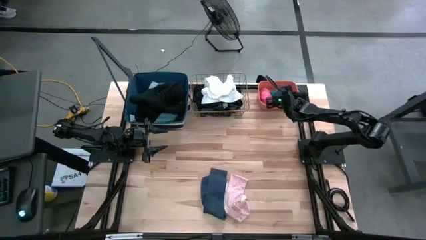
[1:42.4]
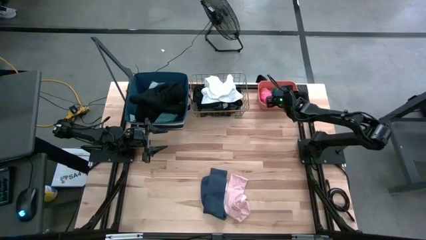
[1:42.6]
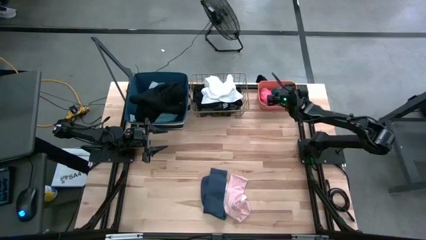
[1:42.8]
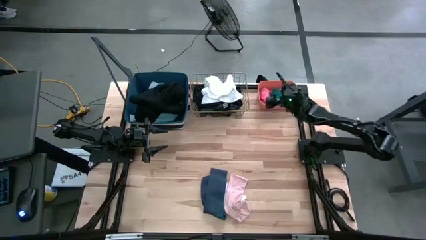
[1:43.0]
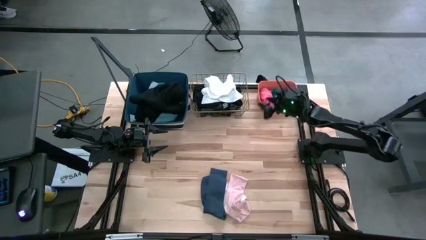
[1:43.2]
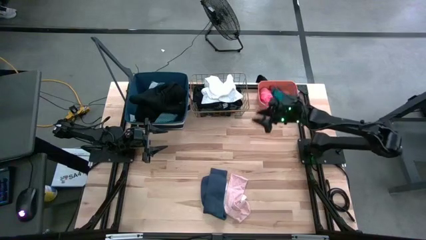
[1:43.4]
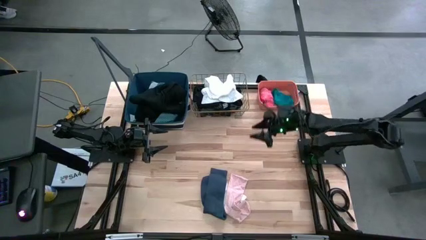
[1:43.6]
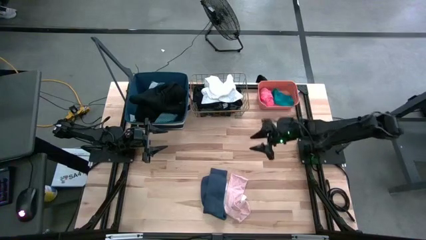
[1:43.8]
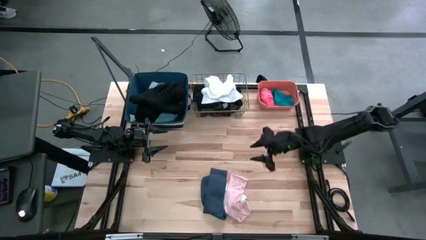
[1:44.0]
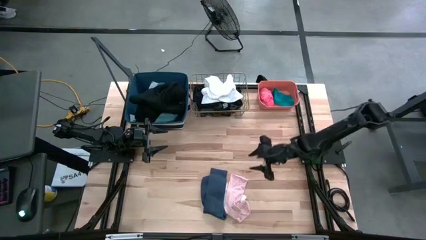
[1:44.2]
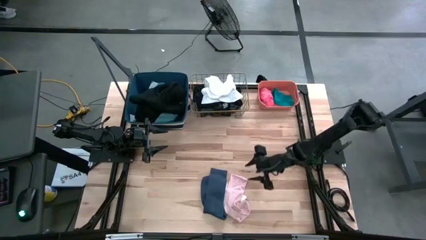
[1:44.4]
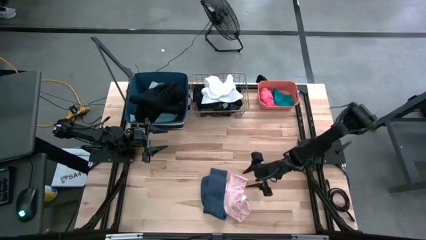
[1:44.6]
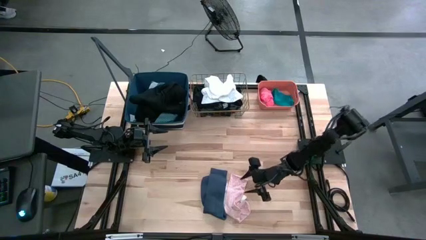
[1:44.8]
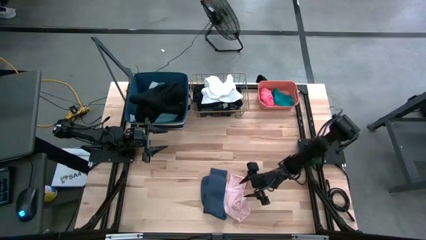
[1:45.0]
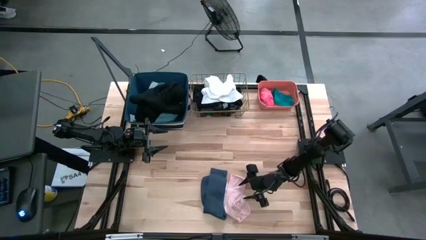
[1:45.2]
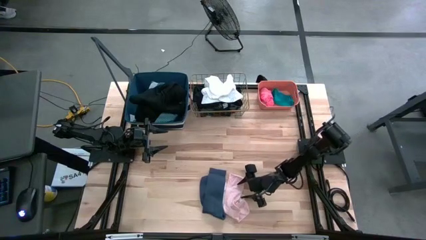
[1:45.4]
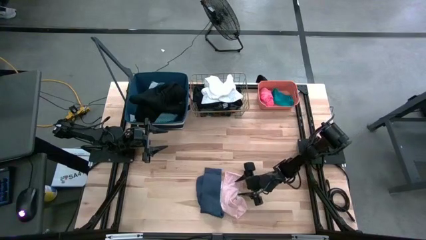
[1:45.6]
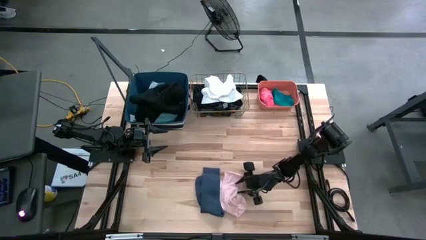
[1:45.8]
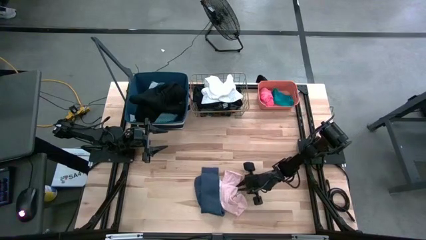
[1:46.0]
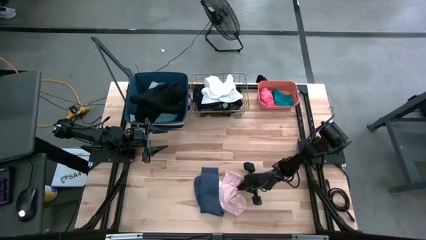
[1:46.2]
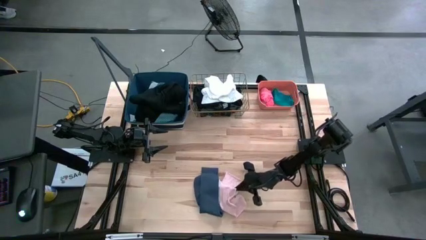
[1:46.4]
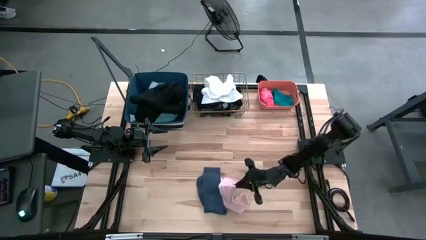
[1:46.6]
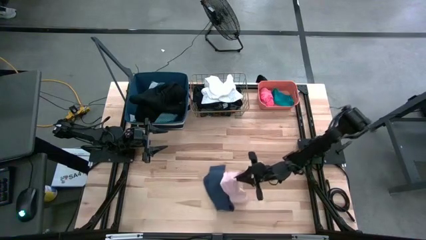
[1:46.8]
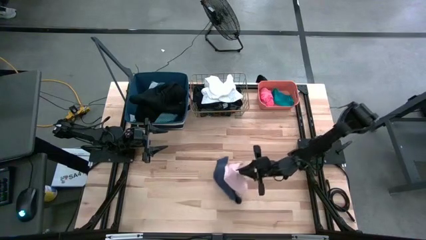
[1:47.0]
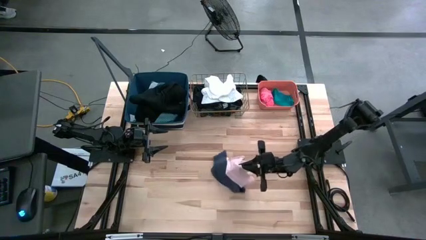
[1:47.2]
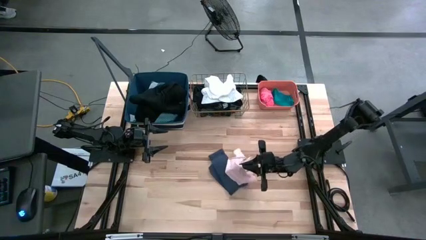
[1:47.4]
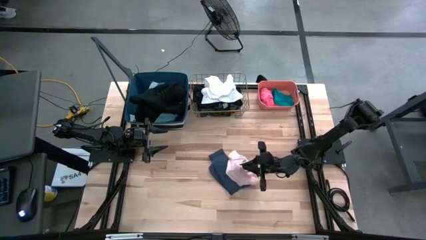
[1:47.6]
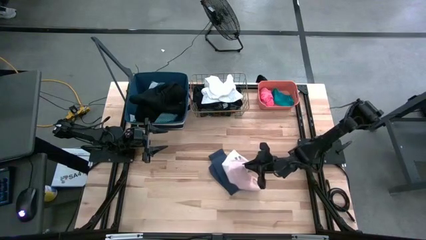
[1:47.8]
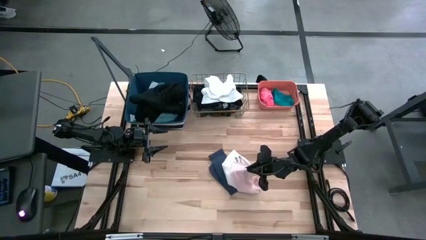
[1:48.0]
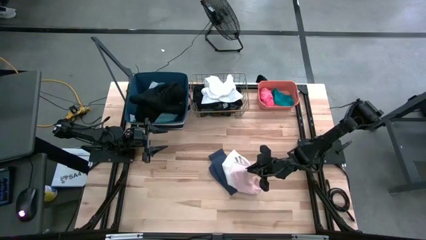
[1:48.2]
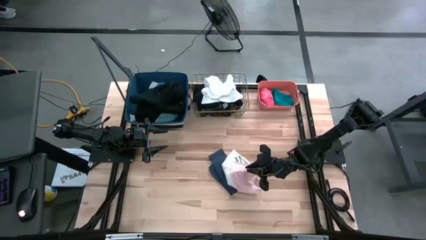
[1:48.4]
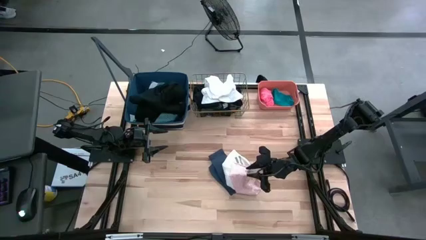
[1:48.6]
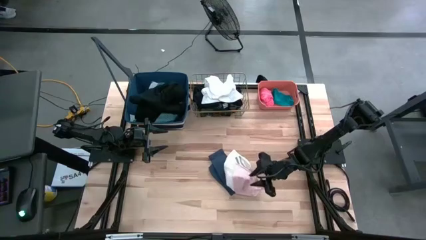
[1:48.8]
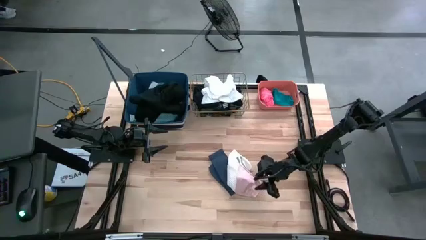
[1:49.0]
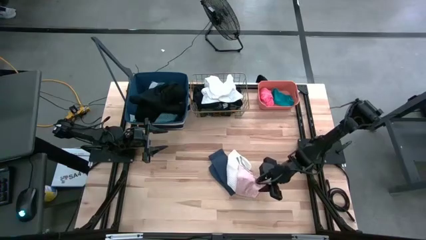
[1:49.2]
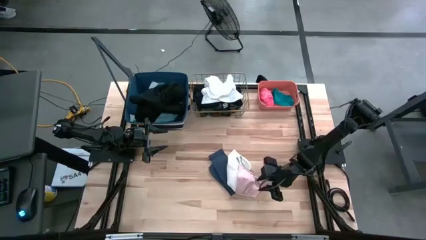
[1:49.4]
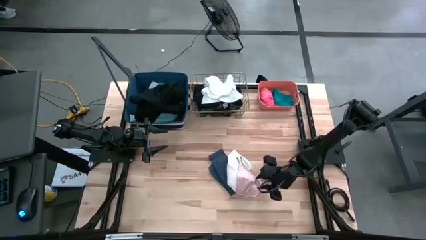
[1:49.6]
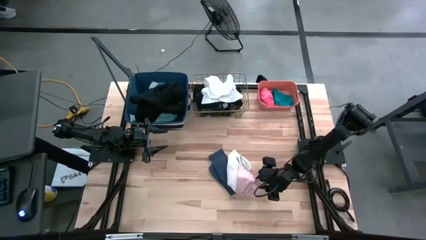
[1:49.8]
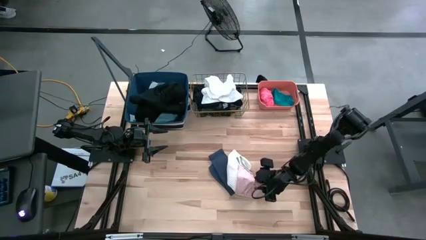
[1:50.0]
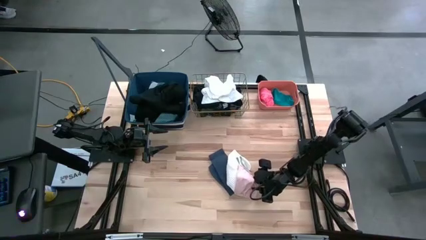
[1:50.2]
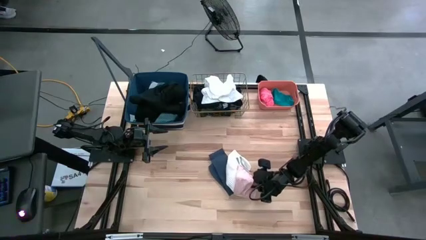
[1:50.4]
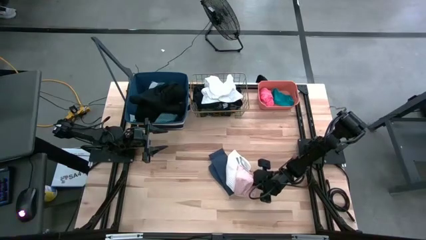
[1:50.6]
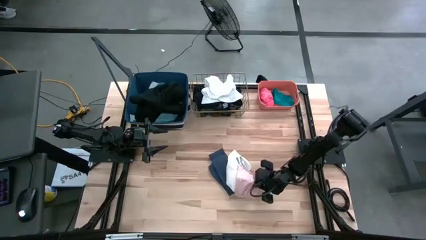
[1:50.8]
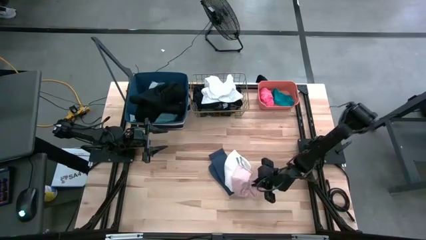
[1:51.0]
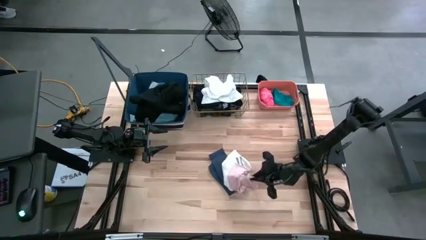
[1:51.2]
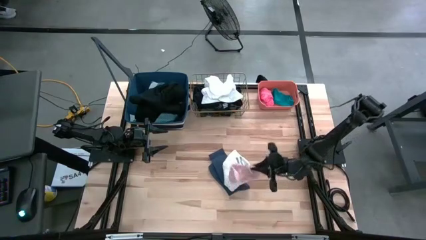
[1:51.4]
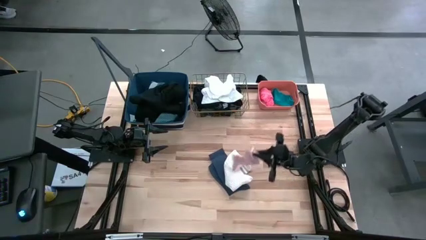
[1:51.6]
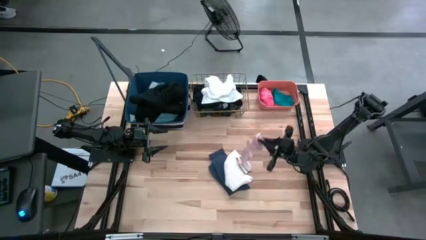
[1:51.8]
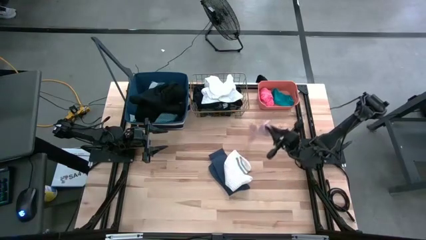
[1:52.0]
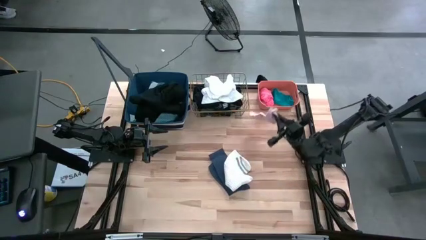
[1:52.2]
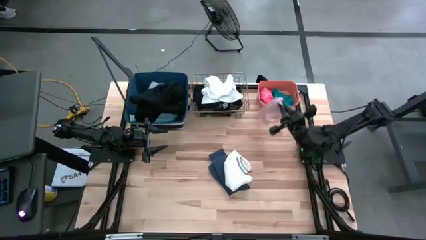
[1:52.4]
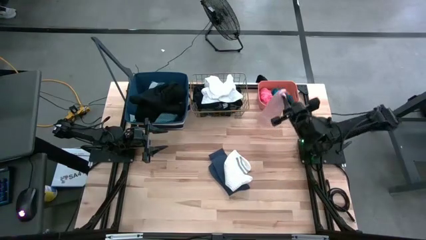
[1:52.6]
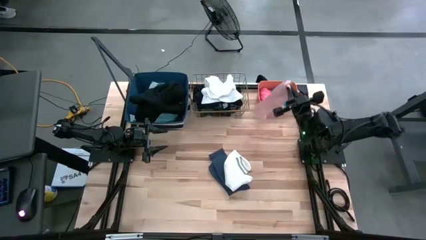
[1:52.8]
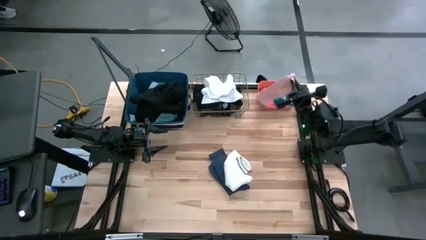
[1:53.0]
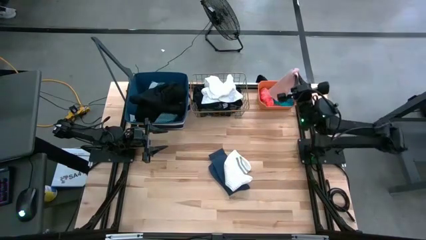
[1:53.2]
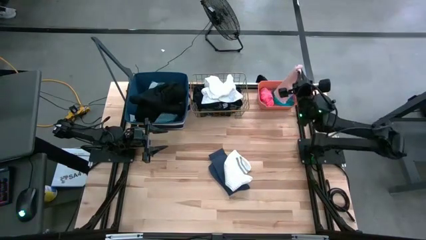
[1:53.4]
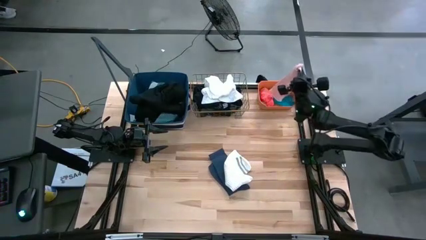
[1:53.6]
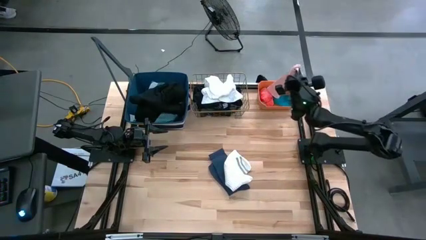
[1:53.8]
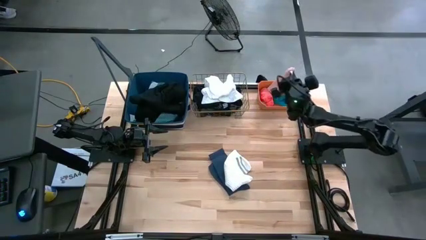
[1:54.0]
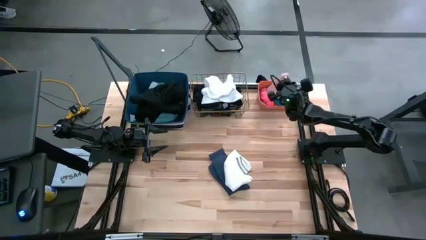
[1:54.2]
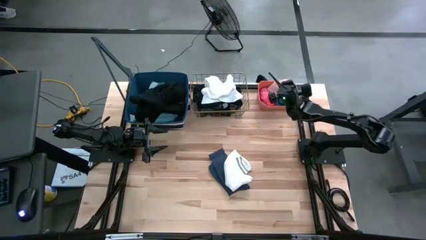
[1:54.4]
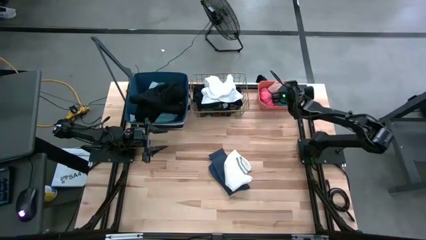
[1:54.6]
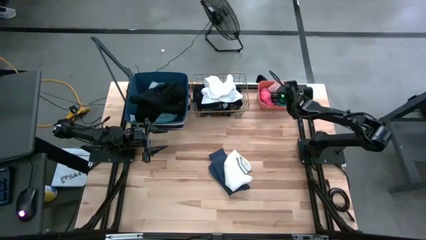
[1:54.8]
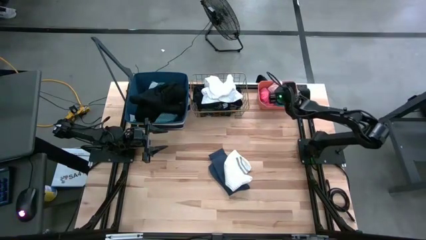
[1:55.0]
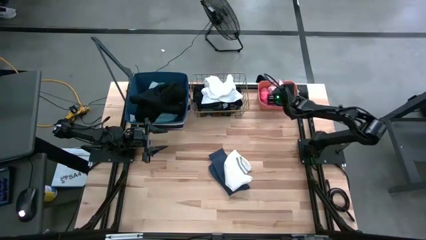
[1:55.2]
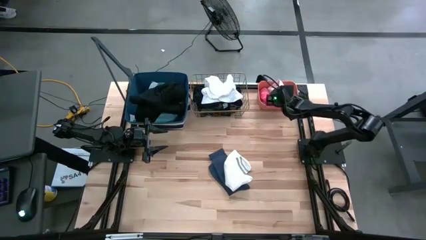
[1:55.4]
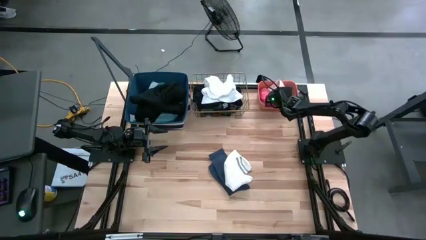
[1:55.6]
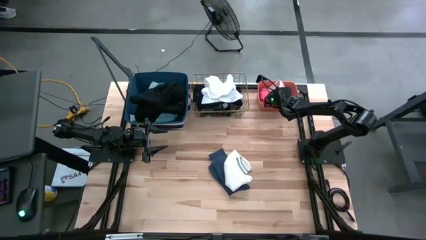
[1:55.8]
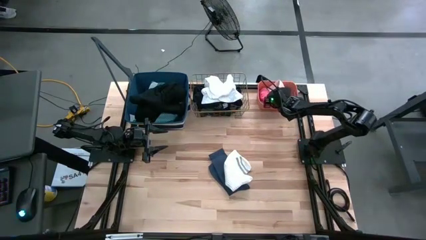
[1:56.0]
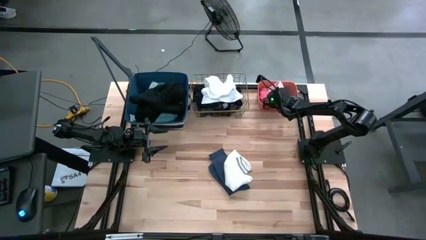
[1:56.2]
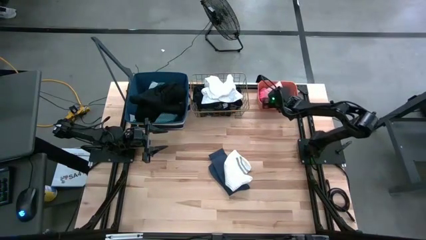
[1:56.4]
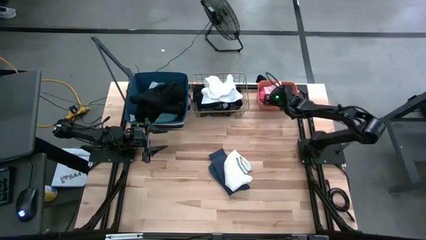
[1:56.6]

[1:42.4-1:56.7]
Task: Pick & Place Cloths
Put the pink sock into the orange bin

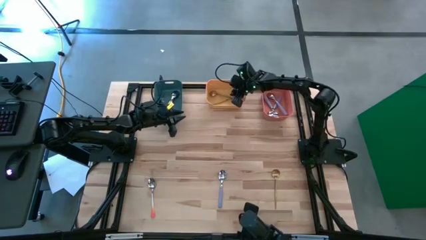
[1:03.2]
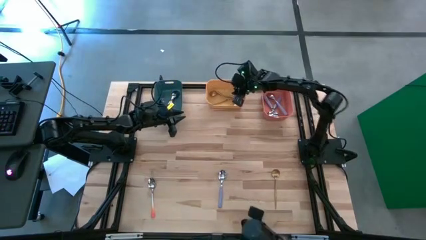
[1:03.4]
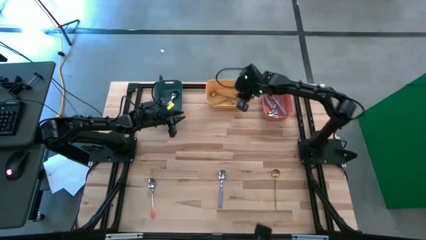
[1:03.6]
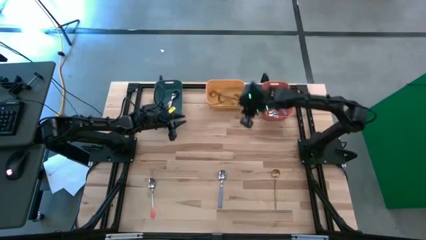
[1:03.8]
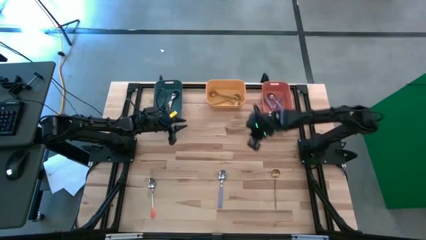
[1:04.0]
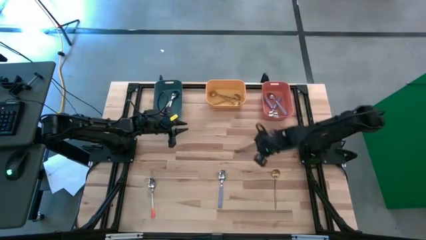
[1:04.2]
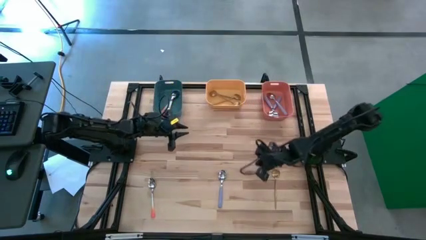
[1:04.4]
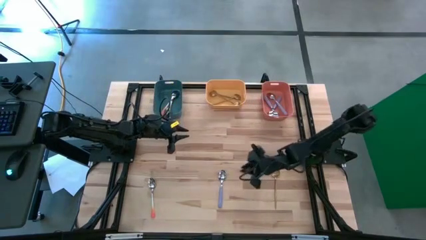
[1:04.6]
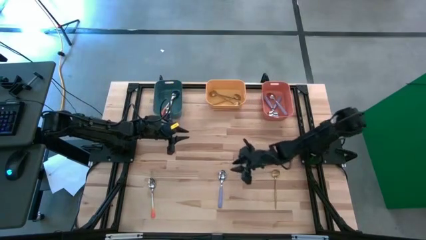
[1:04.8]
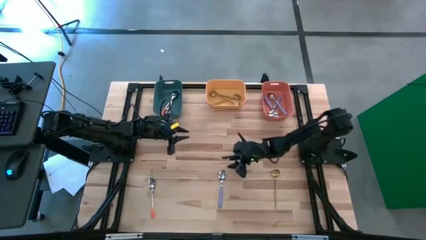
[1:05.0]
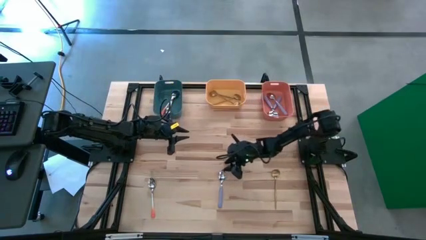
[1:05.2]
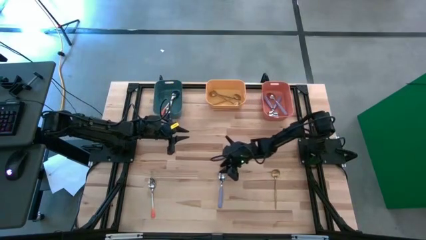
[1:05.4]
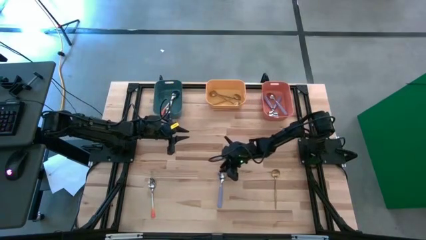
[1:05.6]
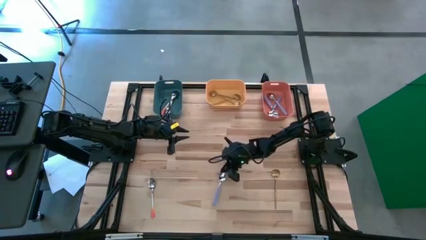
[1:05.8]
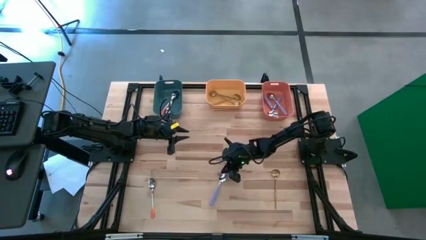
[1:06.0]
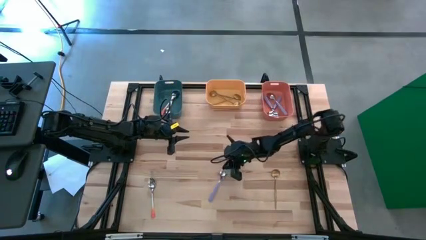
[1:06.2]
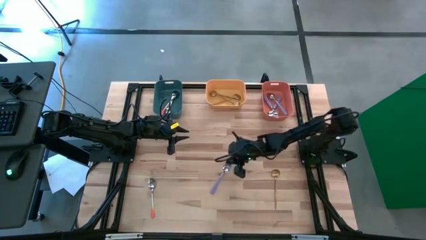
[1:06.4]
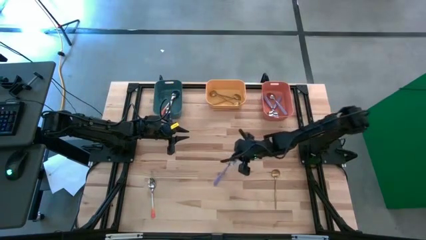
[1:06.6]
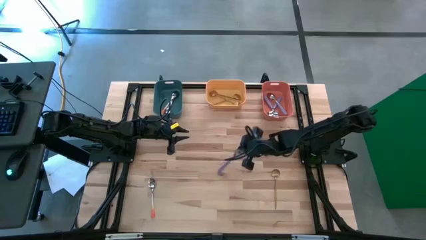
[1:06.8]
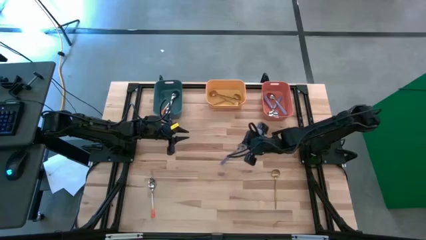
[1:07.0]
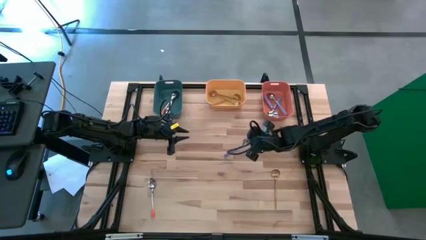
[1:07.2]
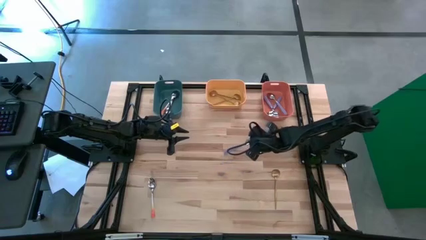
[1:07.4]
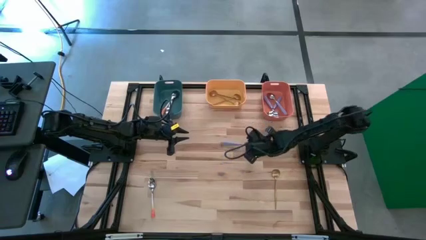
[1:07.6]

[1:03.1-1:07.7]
Task: Sort silverware by color (type)
Put the purple spoon into the orange bin
